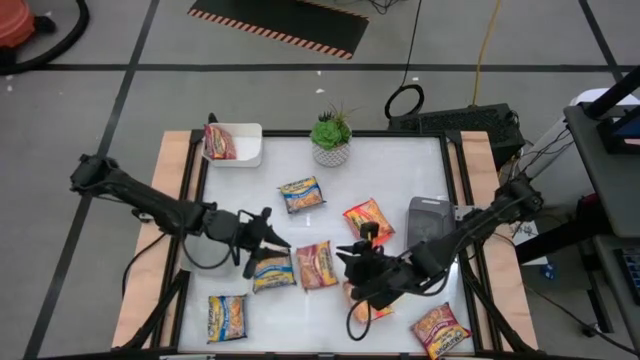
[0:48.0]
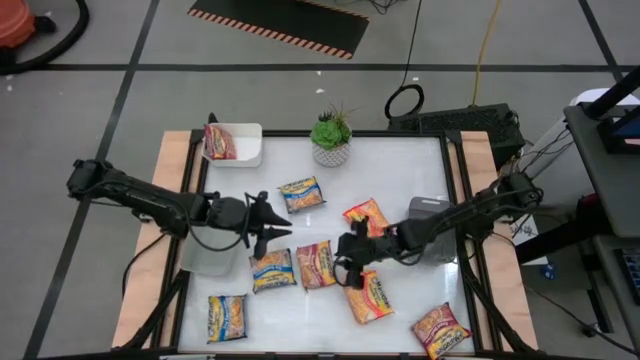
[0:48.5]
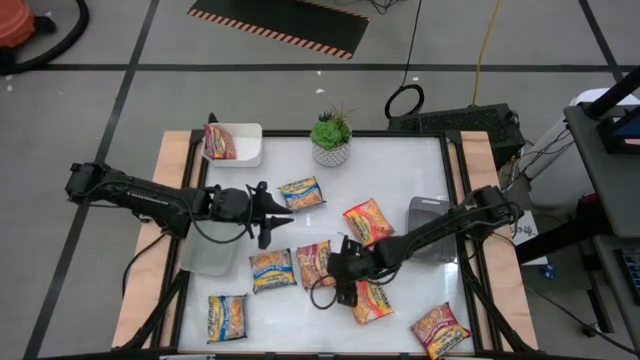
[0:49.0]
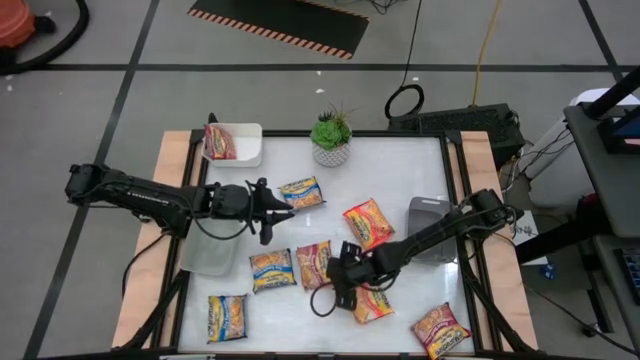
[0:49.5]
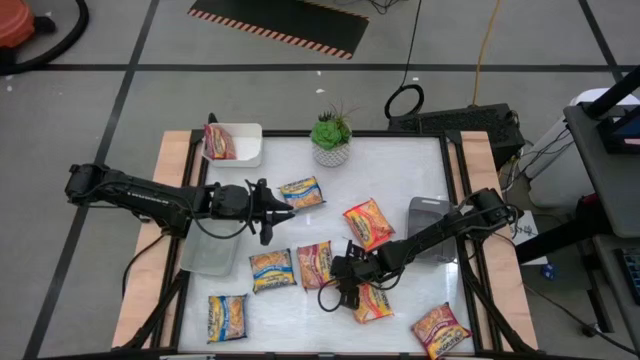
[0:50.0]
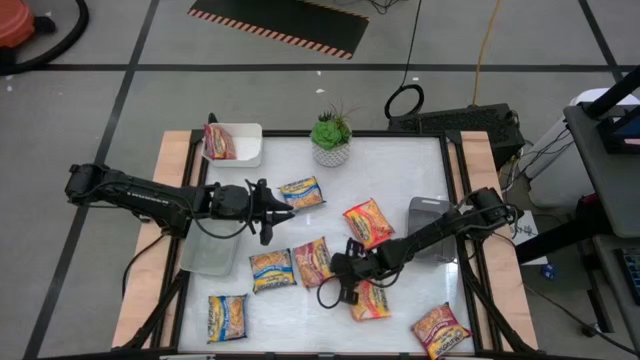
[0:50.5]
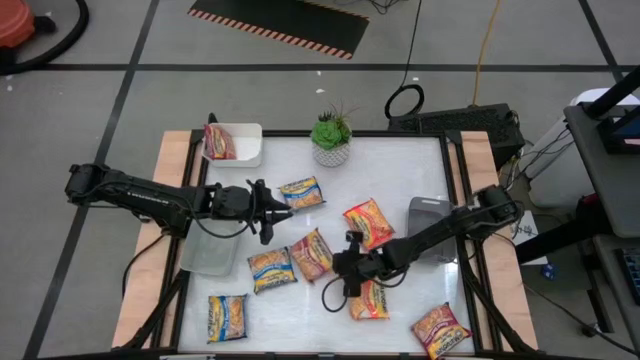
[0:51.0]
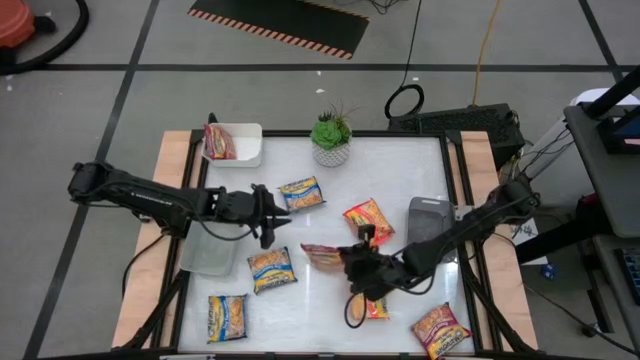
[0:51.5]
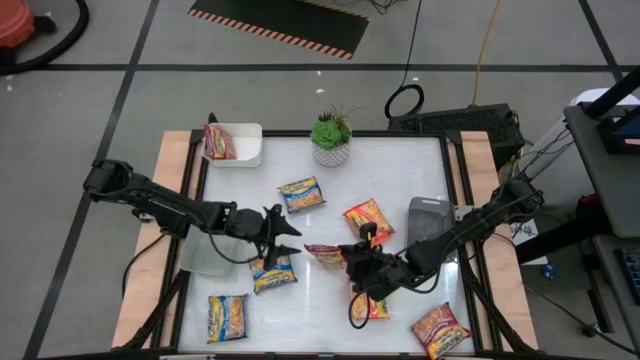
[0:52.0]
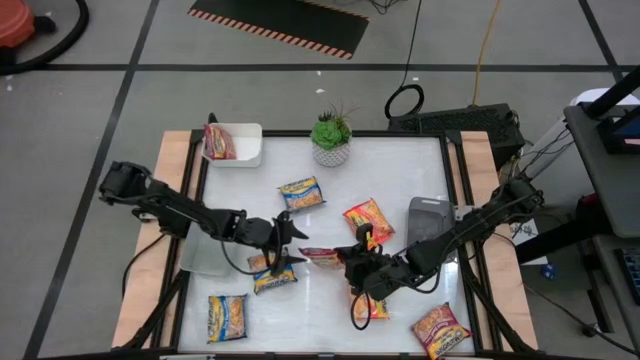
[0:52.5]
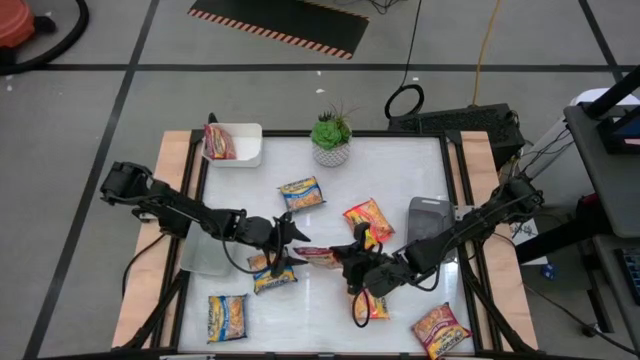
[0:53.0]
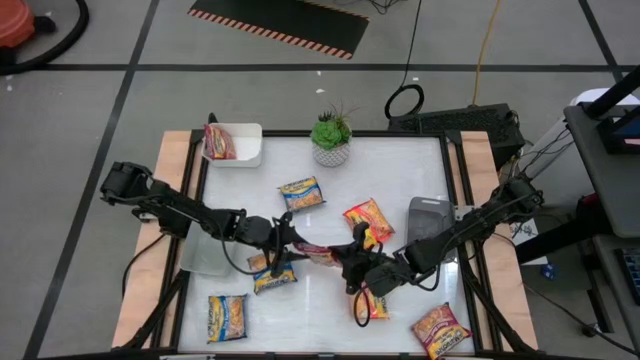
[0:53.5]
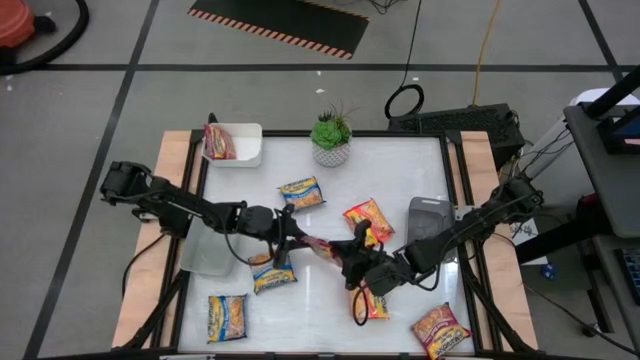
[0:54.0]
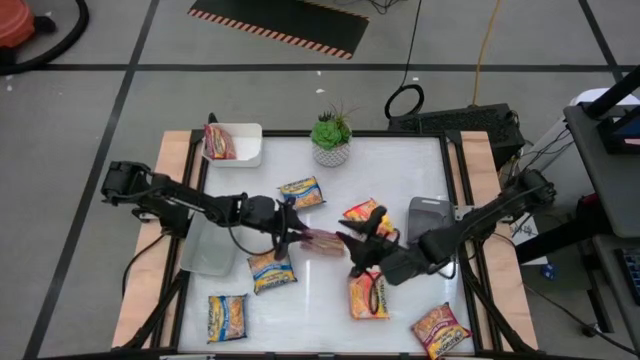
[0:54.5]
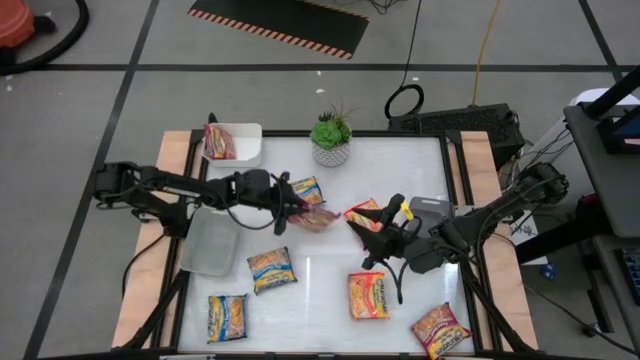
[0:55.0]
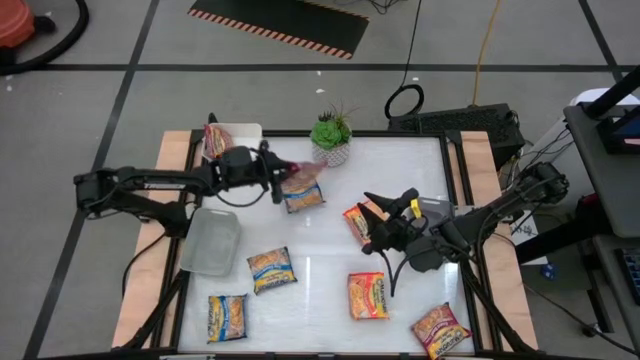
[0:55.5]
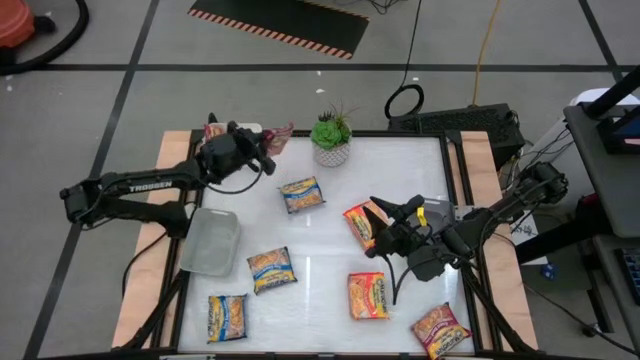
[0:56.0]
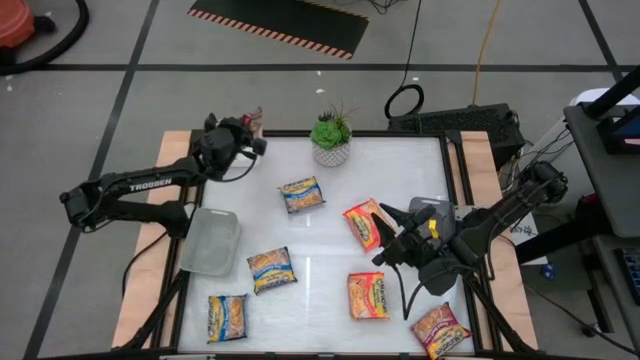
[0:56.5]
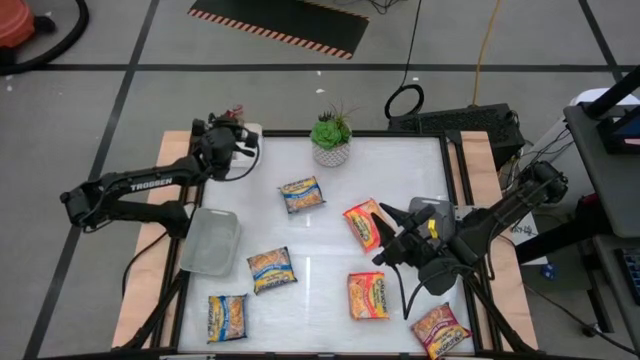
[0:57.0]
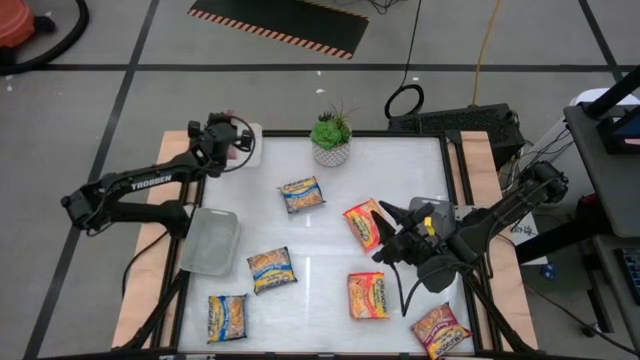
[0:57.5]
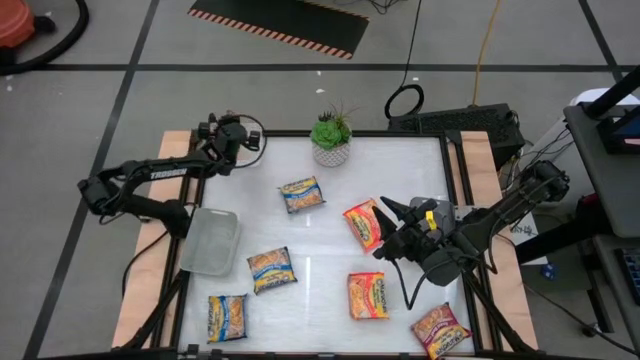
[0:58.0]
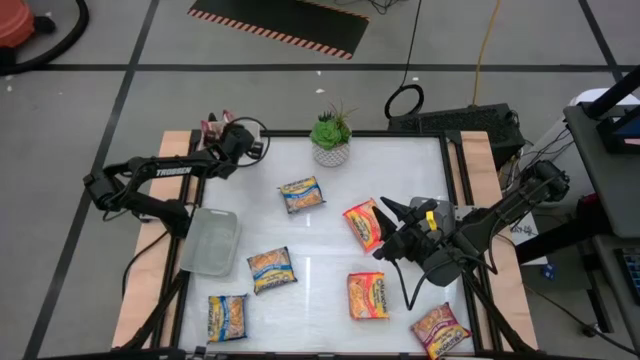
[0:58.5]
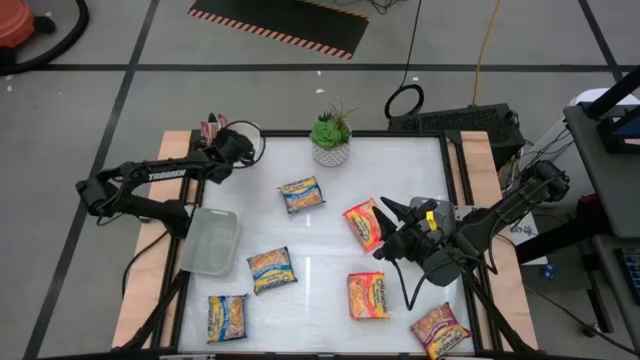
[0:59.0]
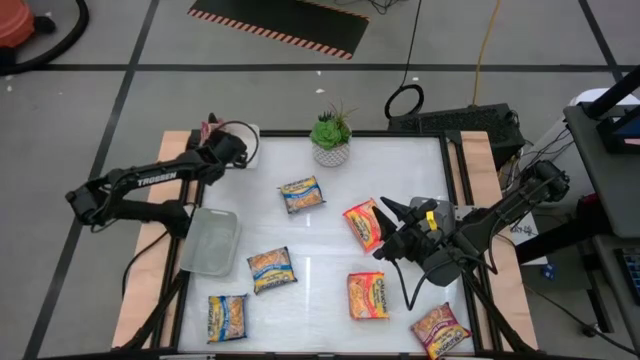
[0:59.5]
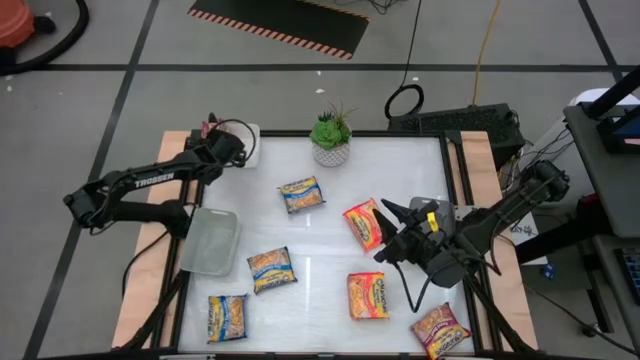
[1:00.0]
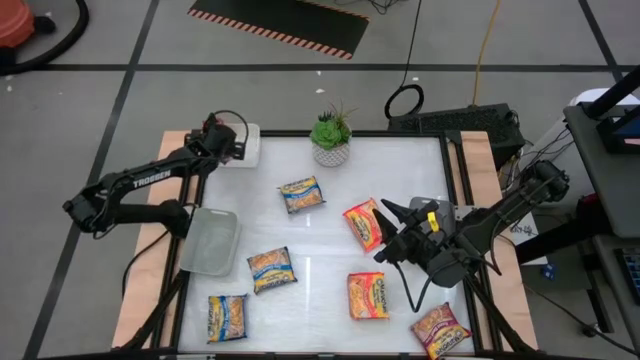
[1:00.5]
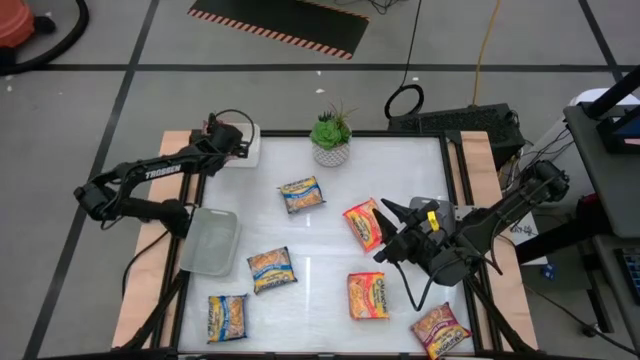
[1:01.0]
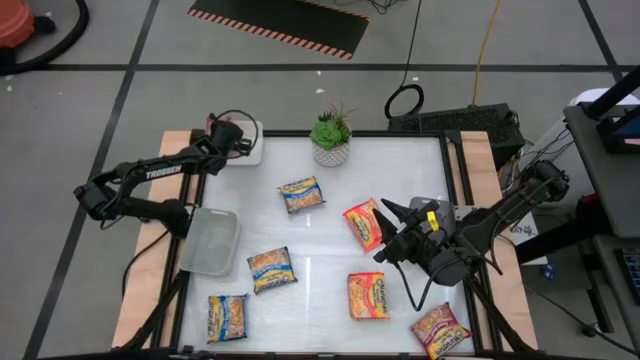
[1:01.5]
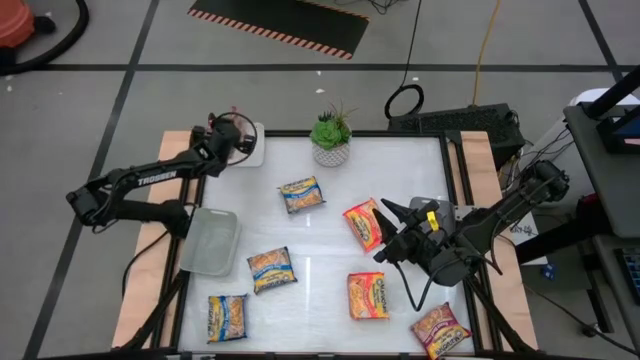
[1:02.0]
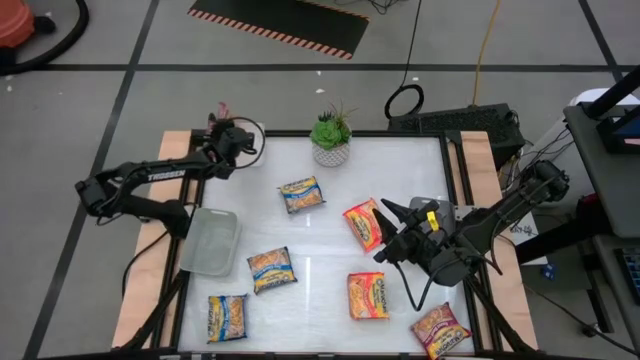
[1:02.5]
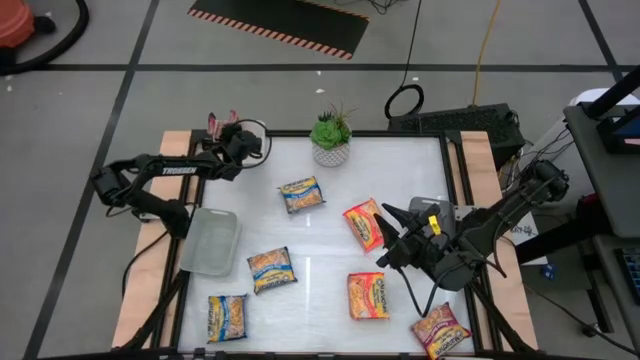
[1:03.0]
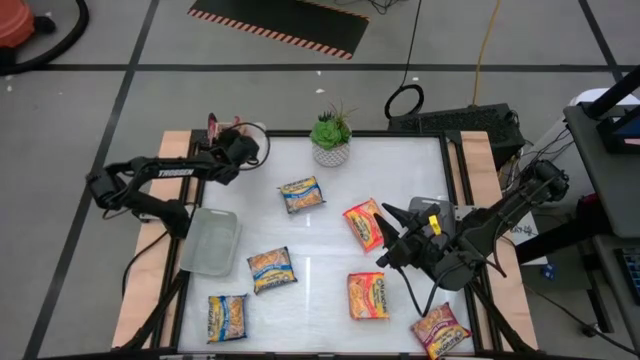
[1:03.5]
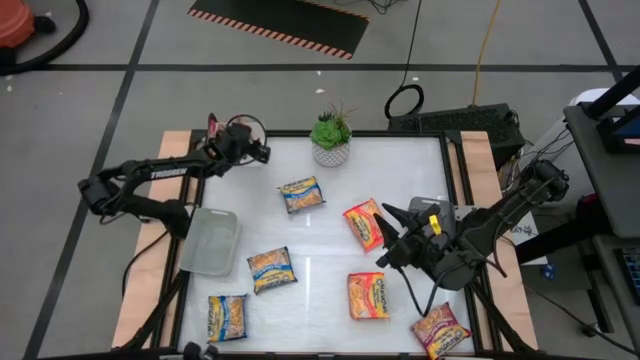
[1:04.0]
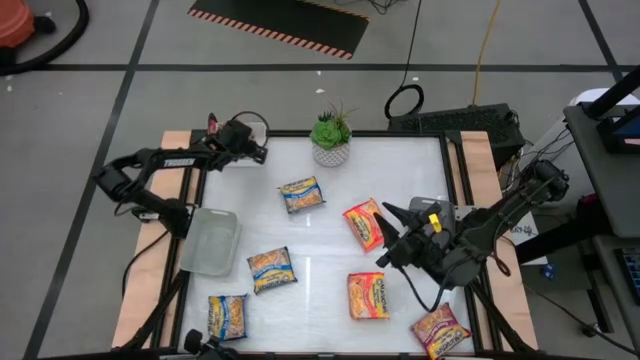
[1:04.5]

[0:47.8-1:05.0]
Task: Sort Maruchan noodles
Put the left red noodle pack into the white bin

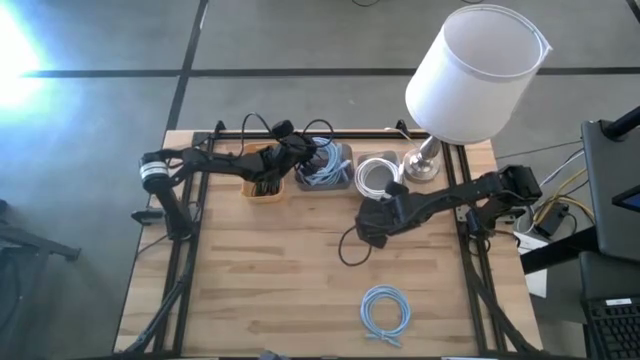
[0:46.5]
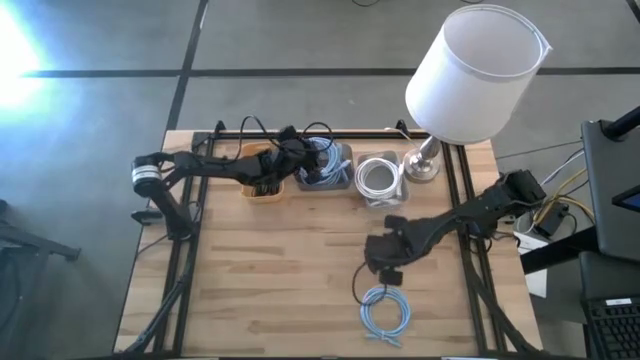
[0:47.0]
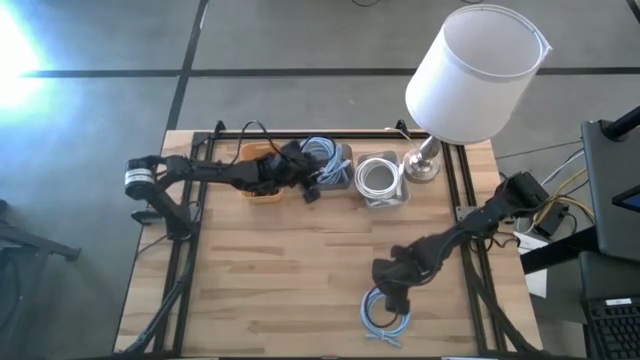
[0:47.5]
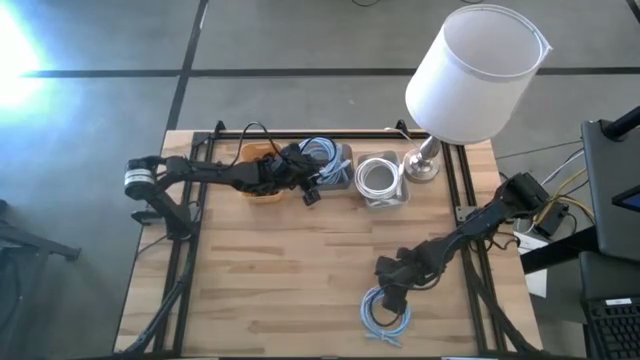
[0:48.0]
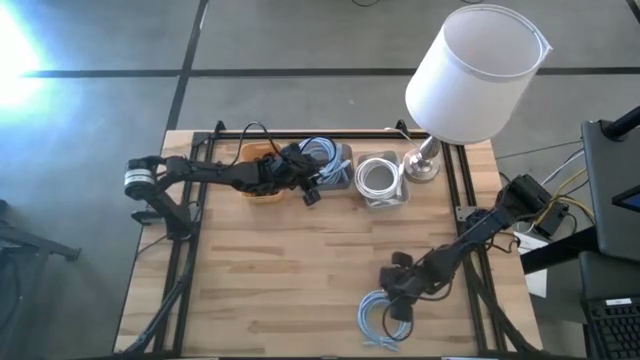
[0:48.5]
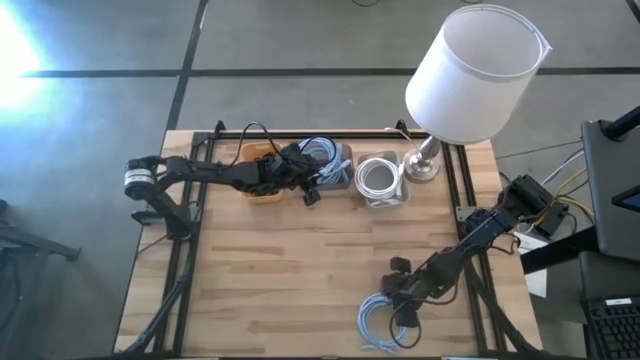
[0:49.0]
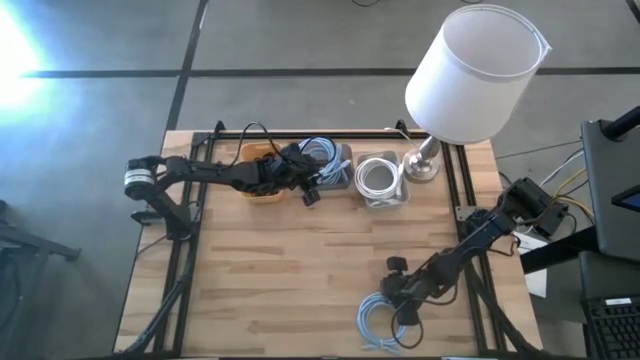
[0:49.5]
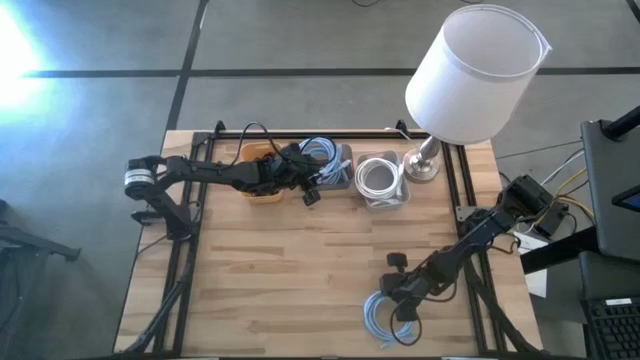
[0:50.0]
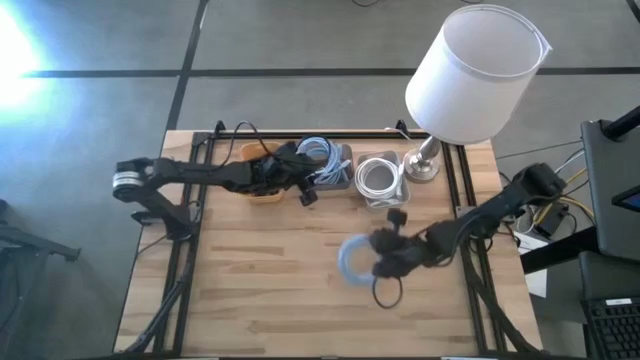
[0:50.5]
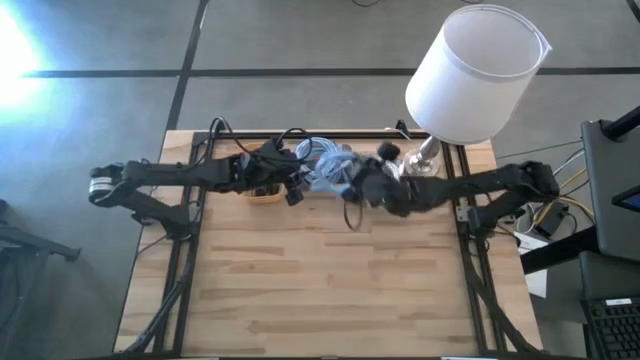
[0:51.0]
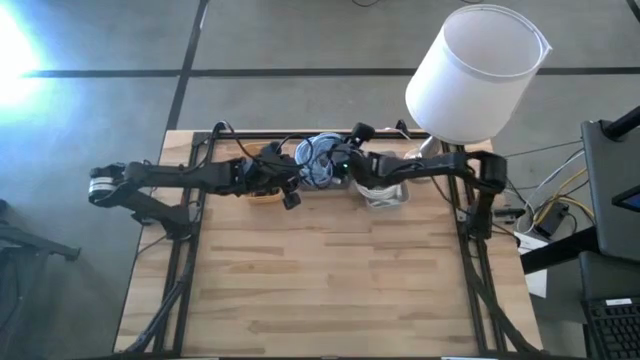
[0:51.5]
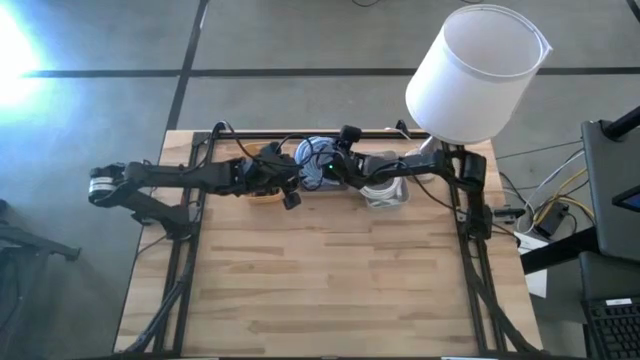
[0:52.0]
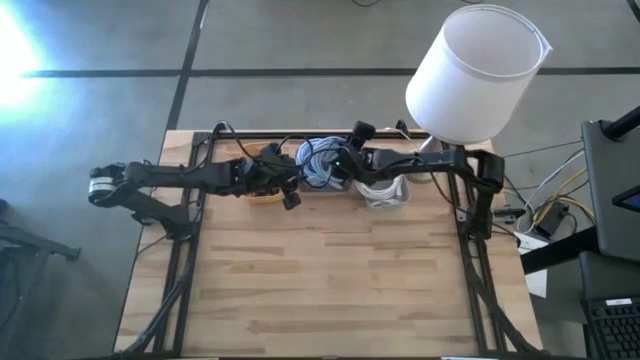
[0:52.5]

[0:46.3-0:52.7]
Task: Pick & Place USB Port
Put the blue charger cable into the black bin
